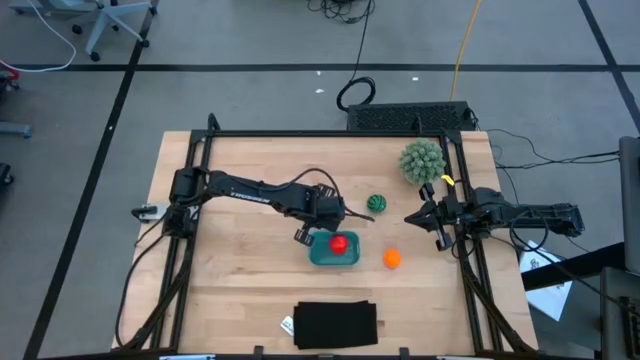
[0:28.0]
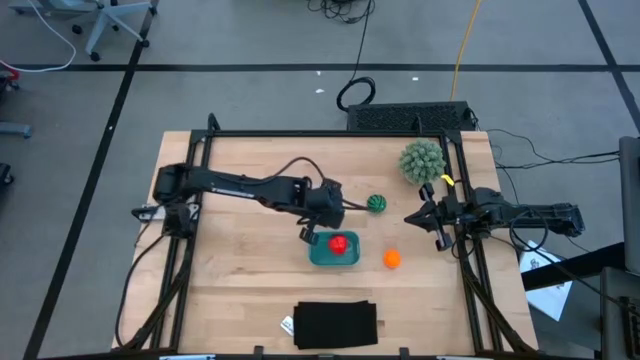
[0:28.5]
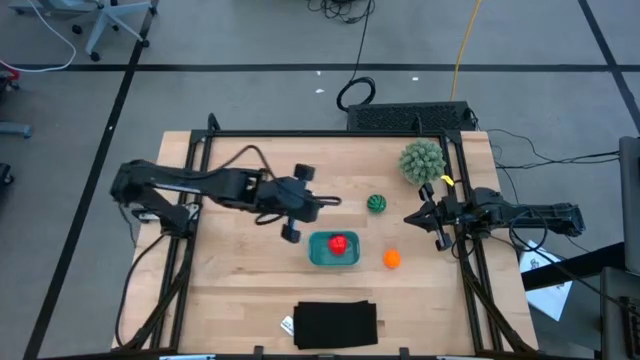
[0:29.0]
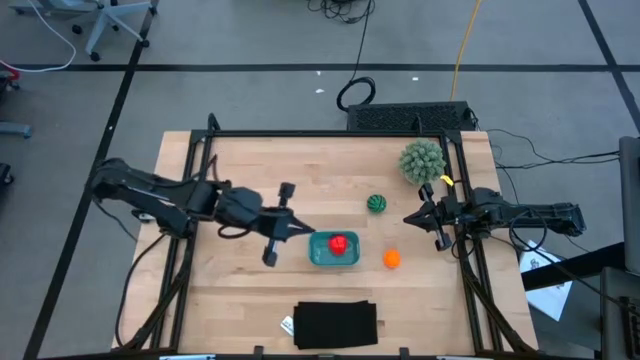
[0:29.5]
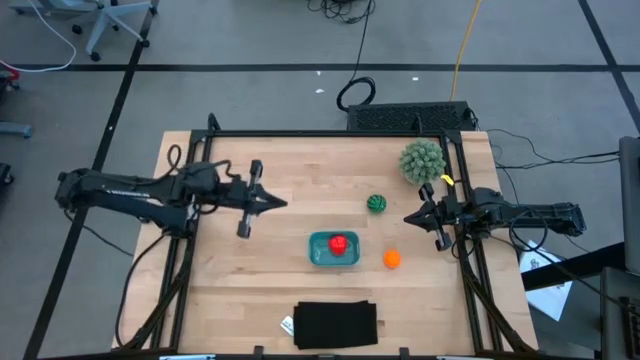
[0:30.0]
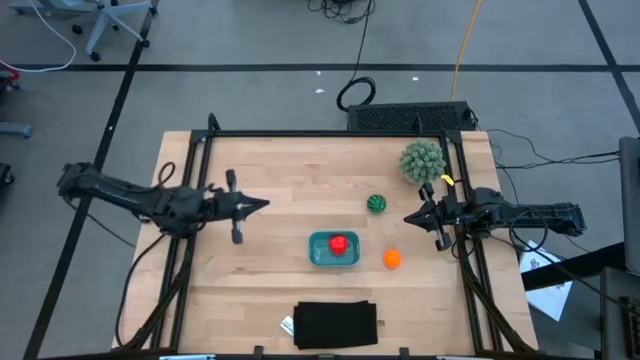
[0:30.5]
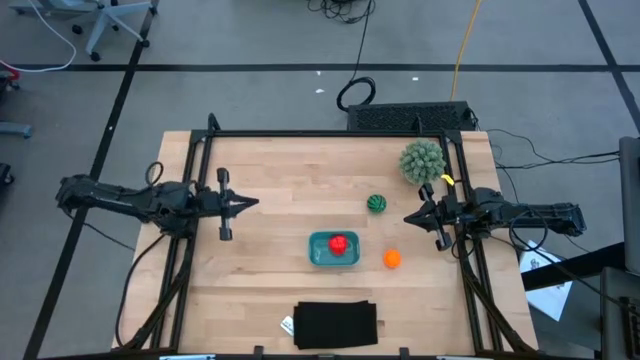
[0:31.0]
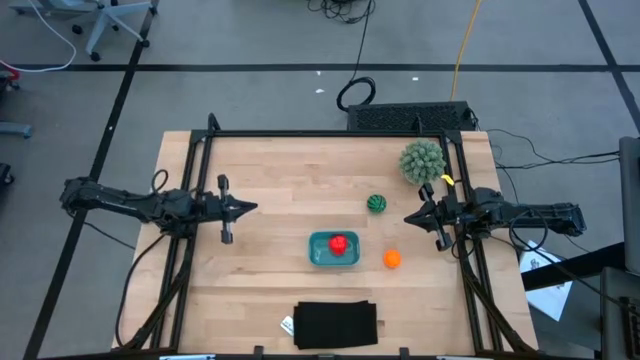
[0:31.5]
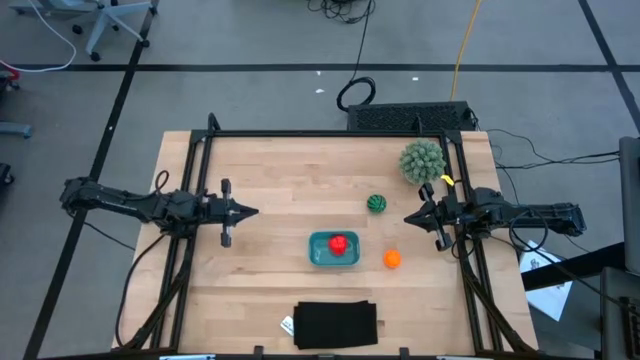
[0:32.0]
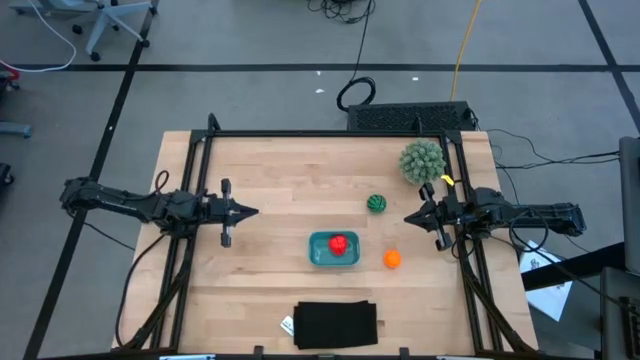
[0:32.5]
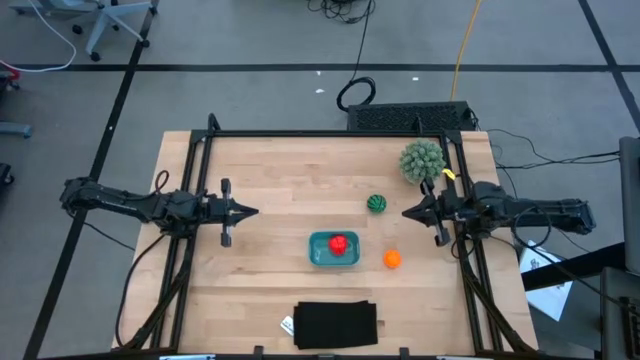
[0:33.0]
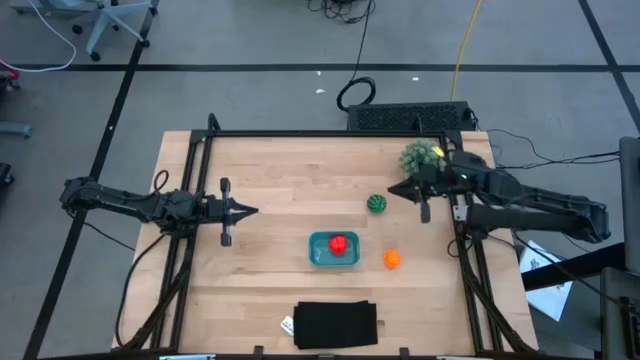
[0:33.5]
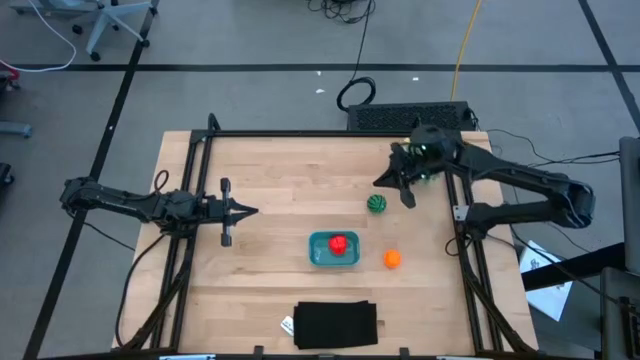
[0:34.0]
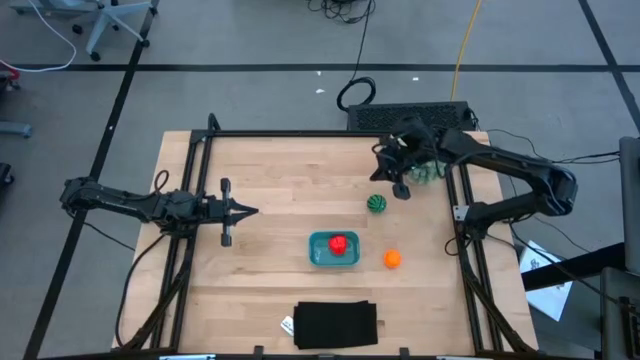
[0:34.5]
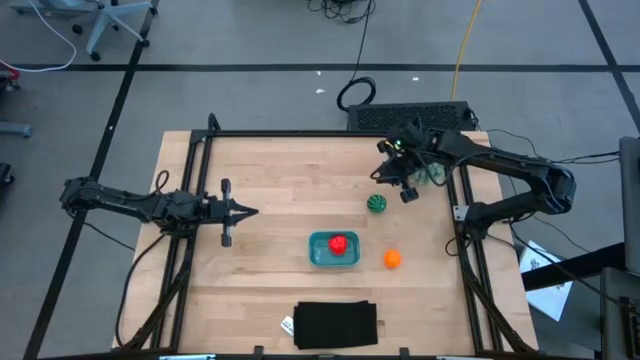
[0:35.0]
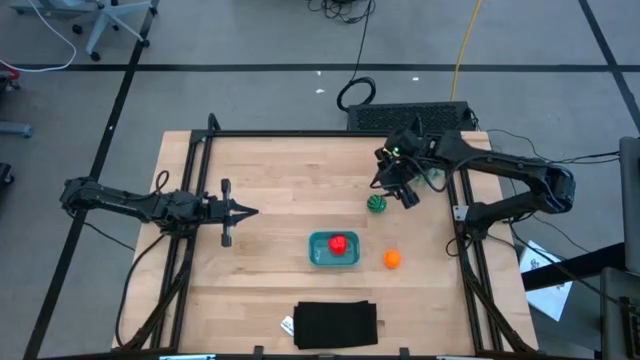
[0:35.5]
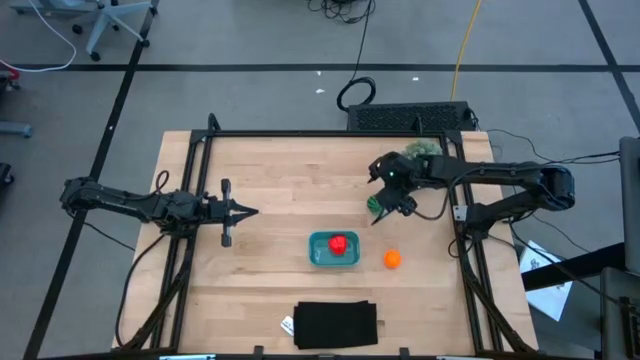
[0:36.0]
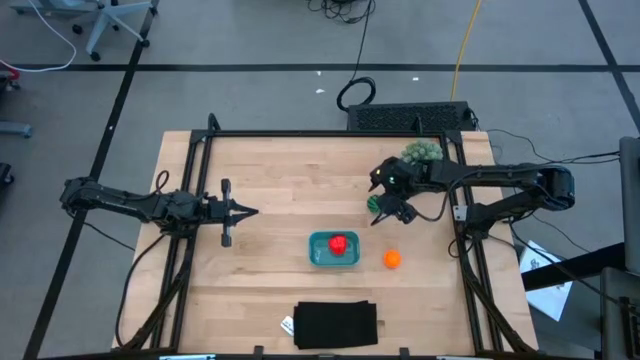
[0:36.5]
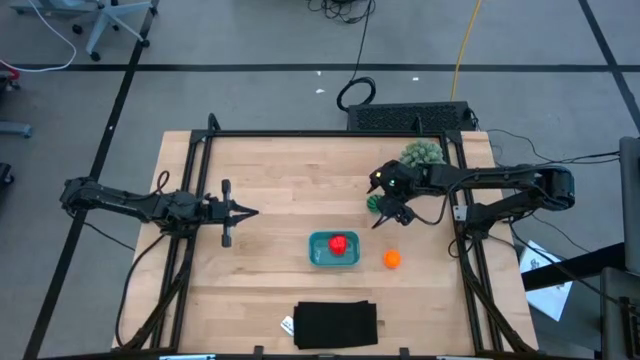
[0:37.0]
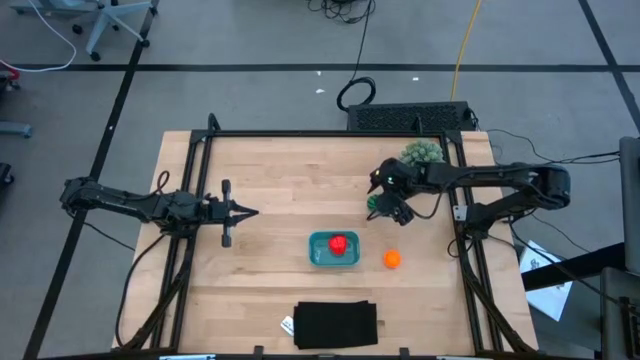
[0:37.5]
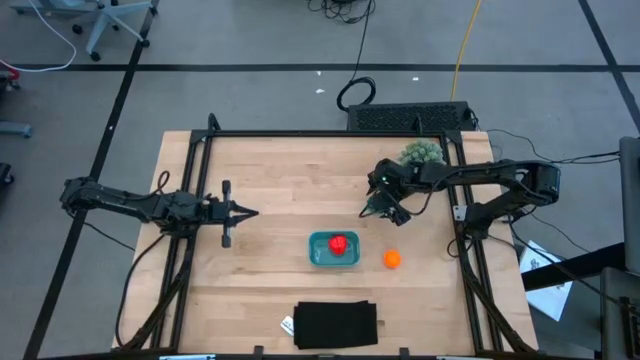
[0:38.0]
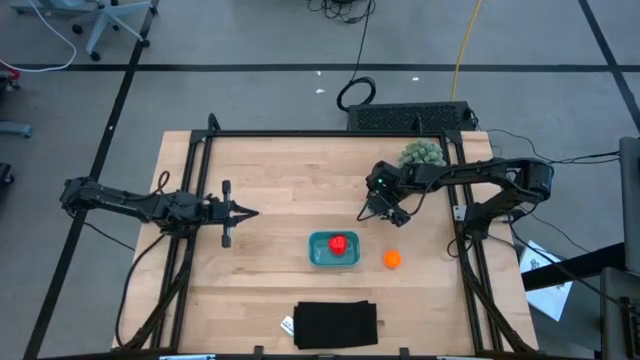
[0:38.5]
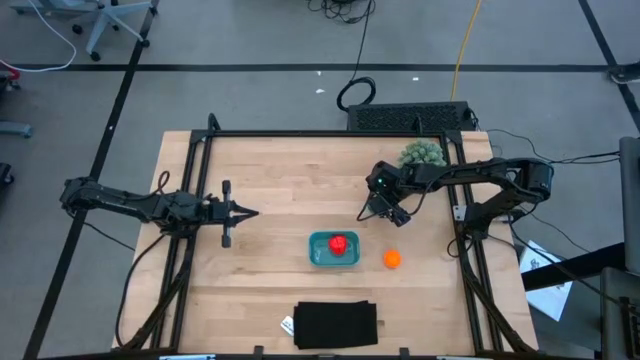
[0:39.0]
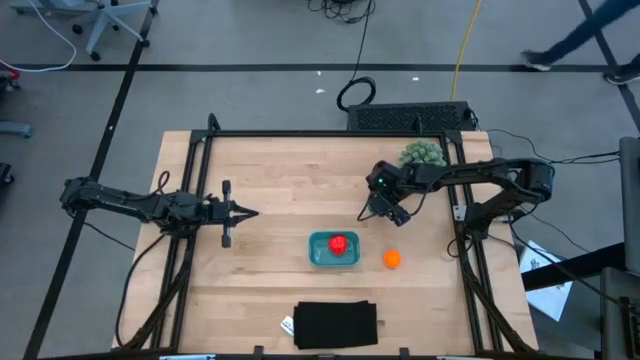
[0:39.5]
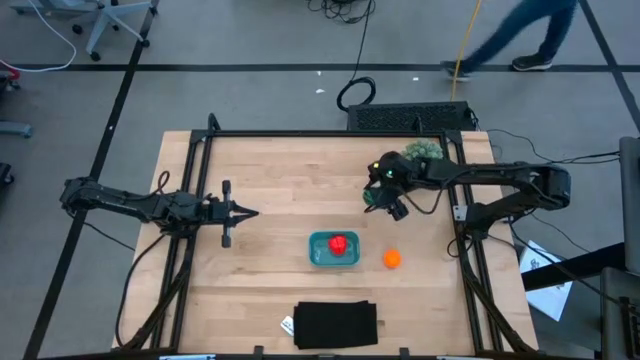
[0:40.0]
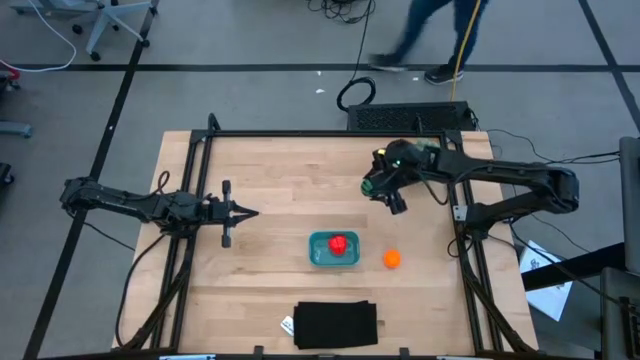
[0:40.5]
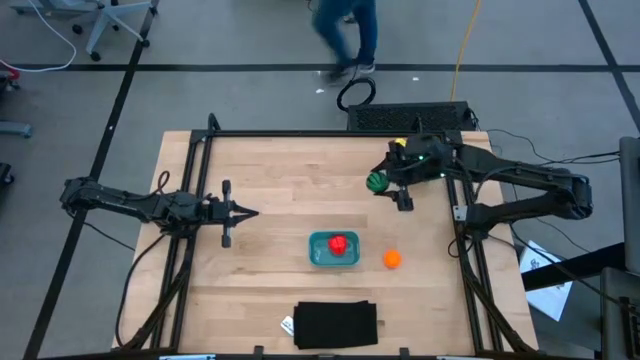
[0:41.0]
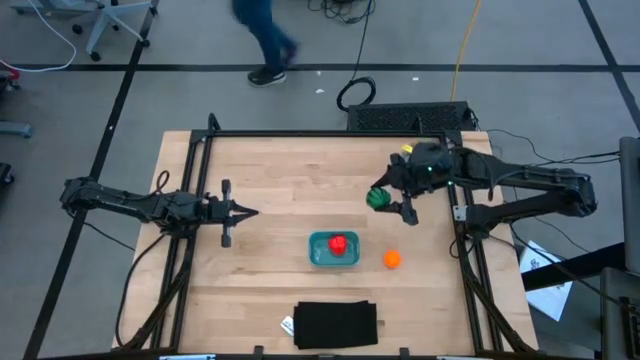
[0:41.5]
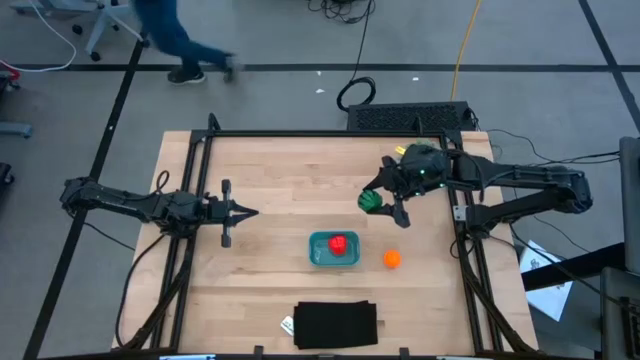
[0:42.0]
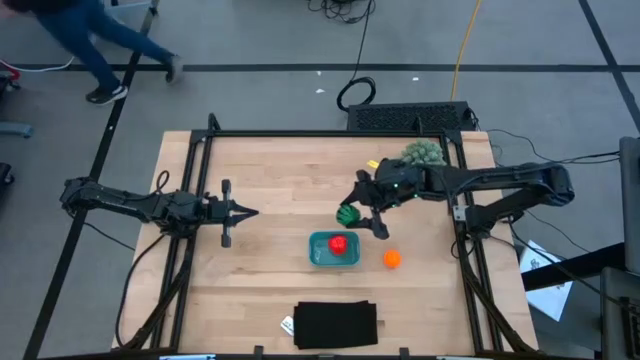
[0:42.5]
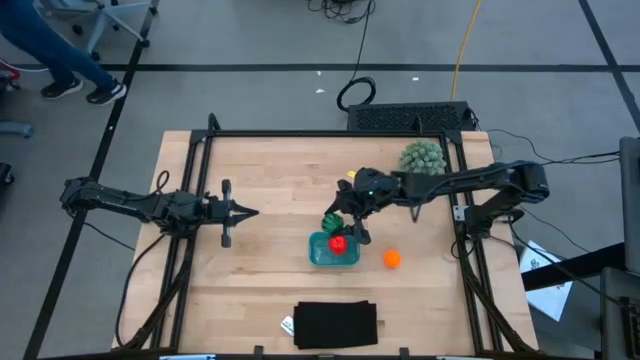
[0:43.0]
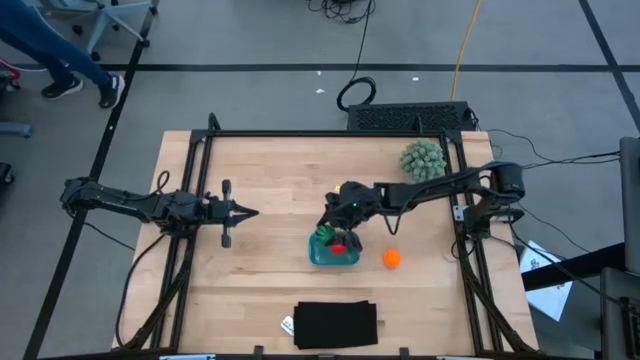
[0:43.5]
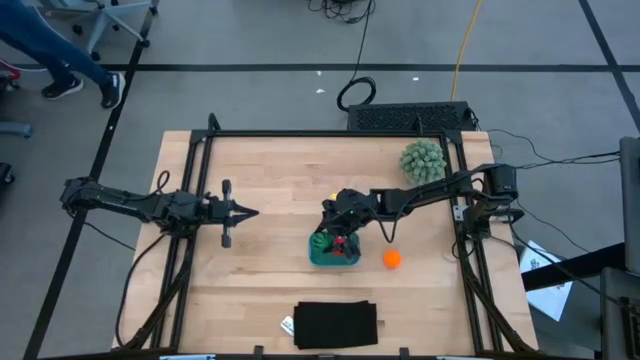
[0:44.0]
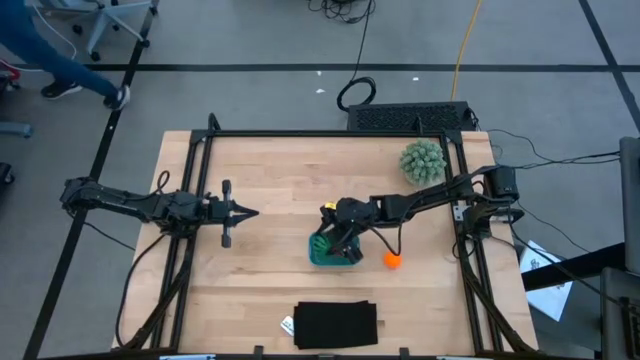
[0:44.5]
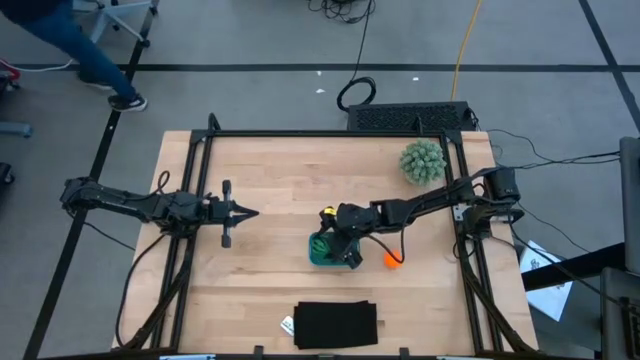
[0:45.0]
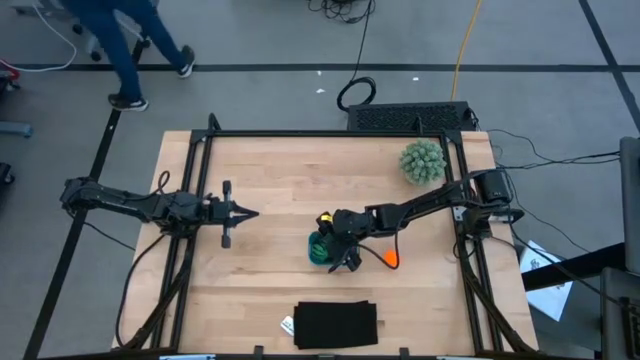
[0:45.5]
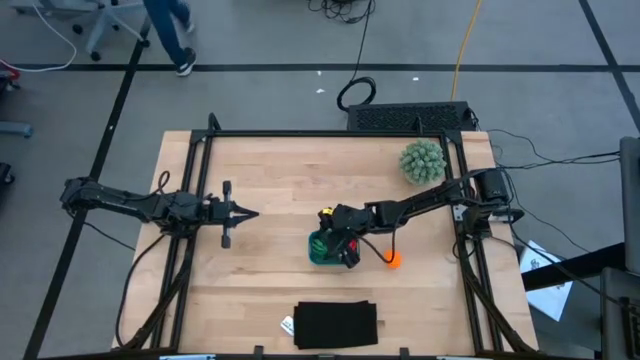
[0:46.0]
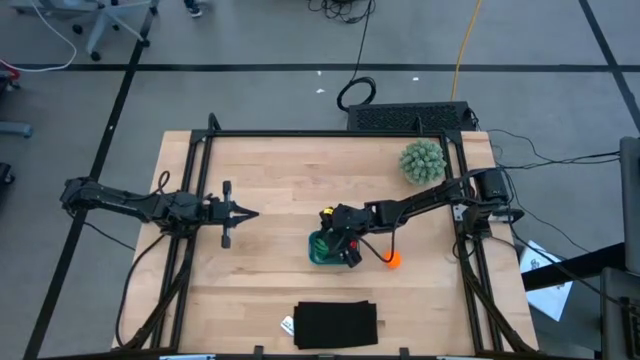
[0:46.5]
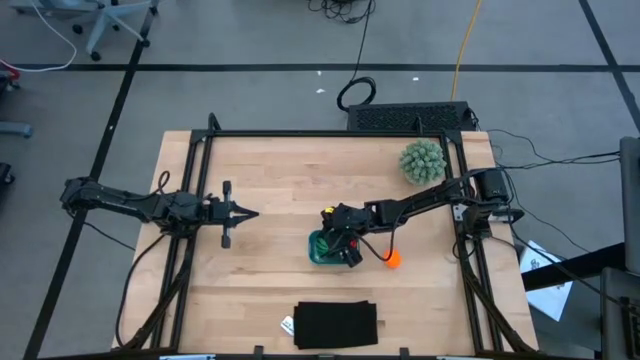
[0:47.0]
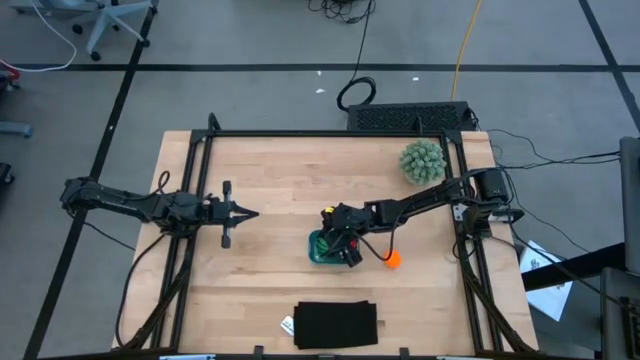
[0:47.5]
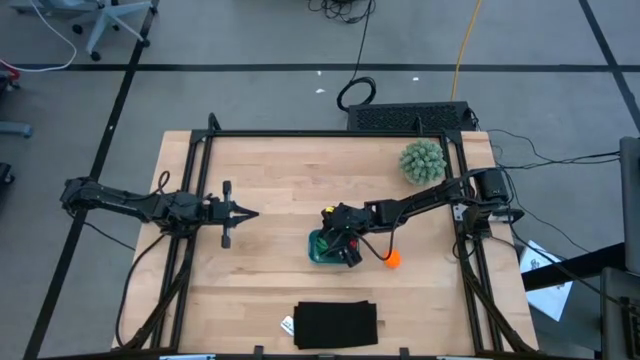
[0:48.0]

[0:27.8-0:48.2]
Task: Pick and placing Produce into tupperware
Put the green watermelon into the blue bin

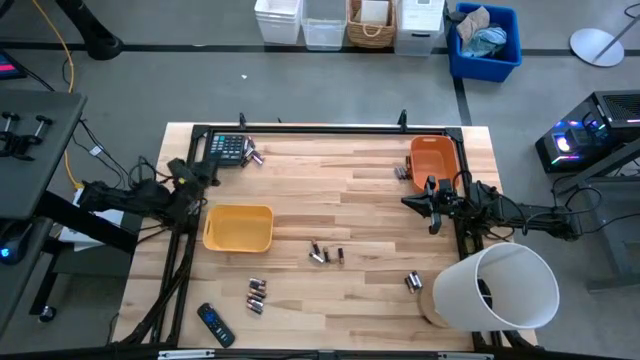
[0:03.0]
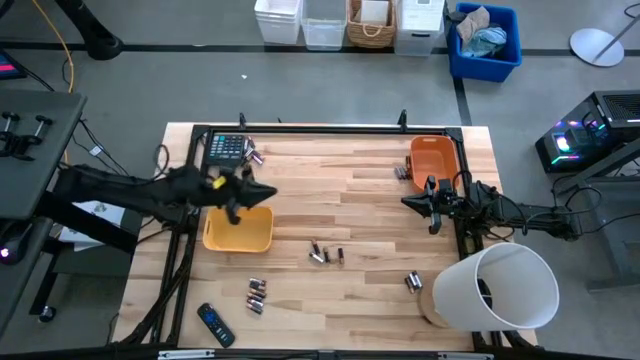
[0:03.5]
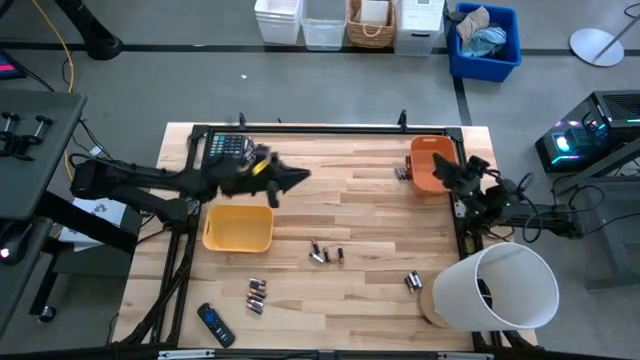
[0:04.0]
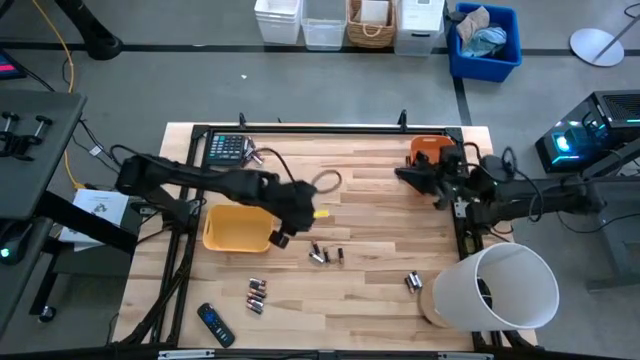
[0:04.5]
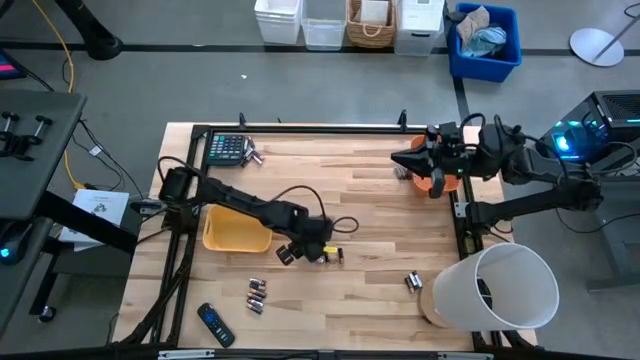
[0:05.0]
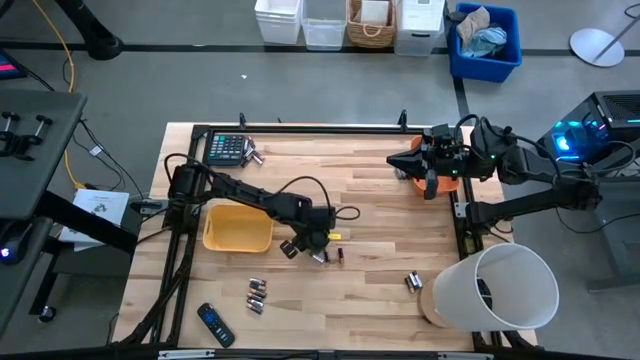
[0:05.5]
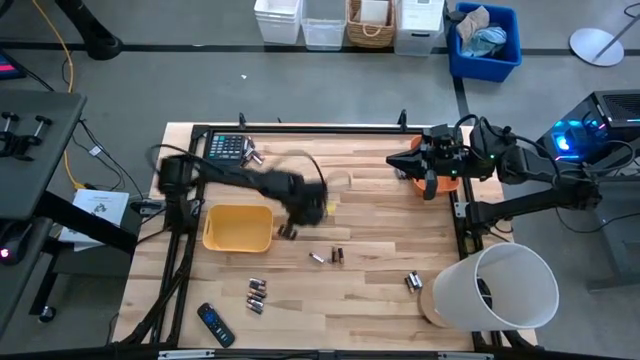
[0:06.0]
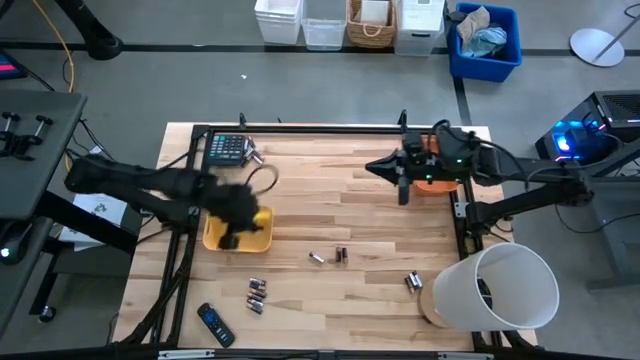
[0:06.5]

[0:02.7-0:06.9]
Task: Sort batteries
Put the black battery into the yellow bin
